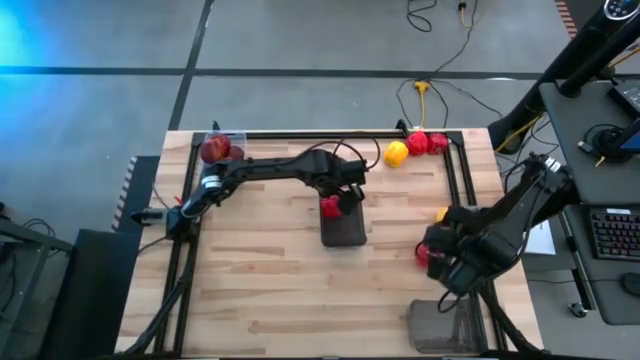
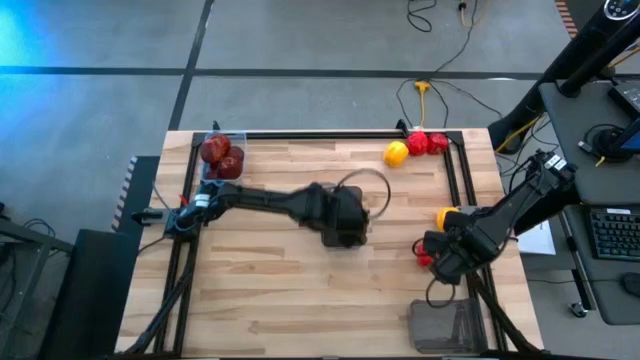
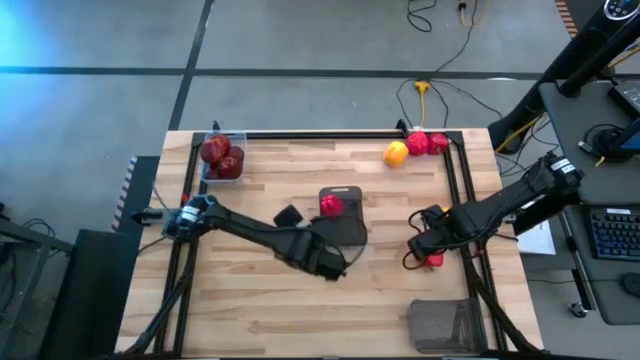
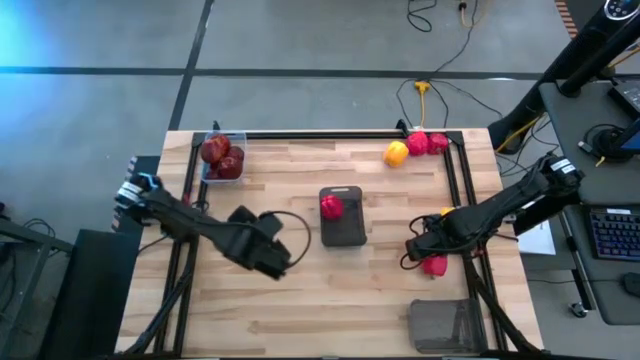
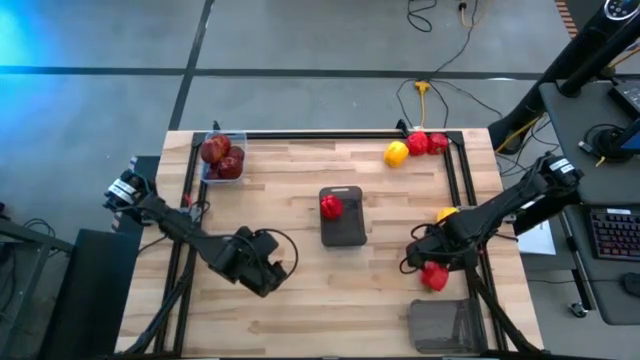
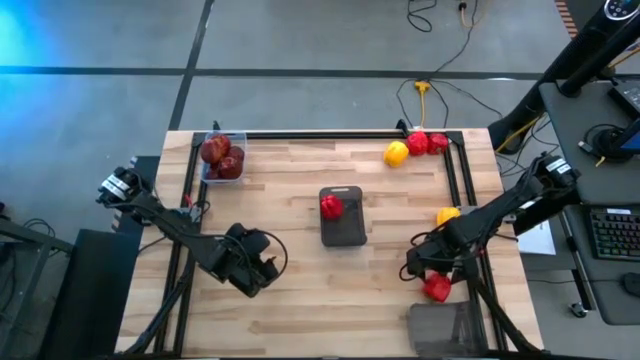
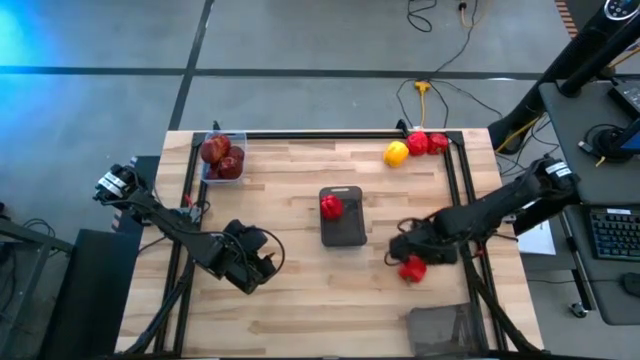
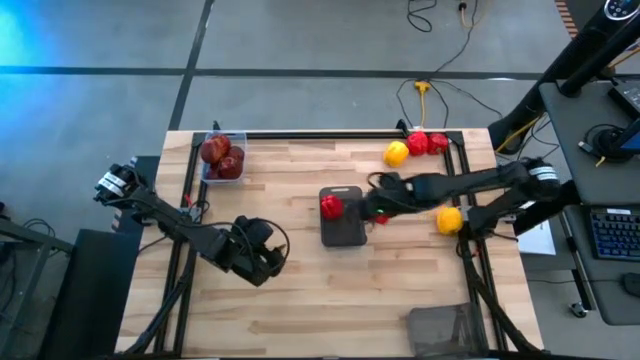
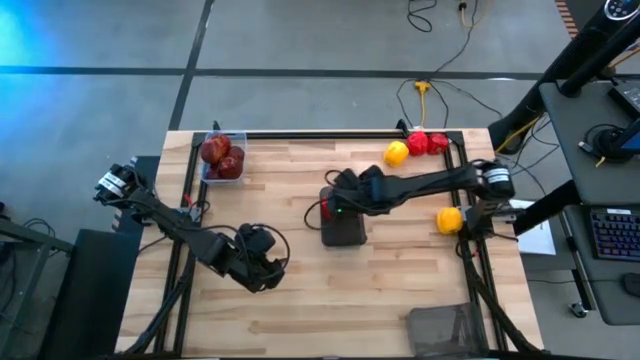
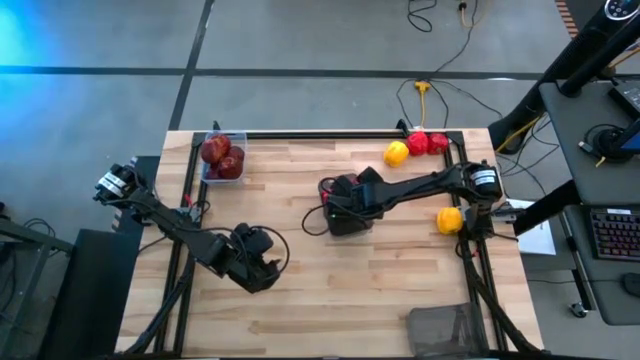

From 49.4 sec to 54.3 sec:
Task: Sort produce into baskets
Put the red bell pepper into the top black transparent bin

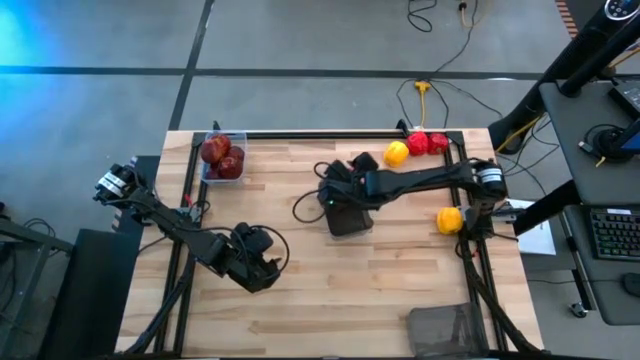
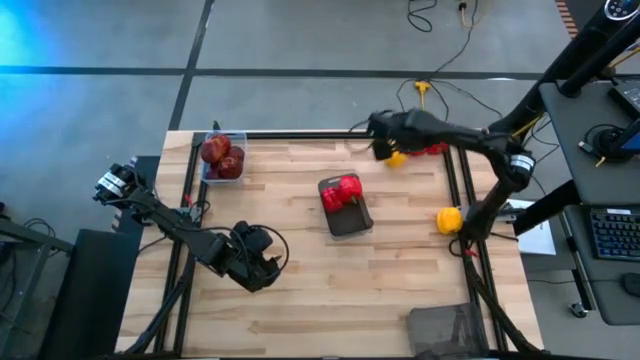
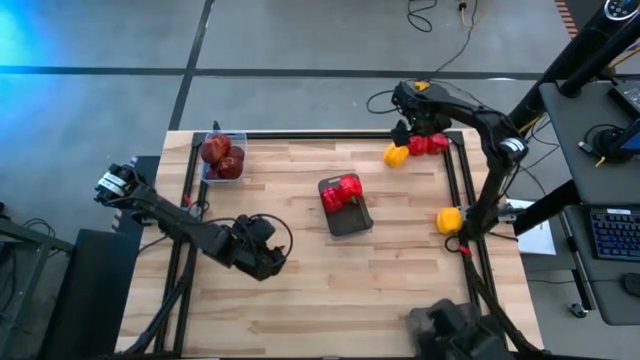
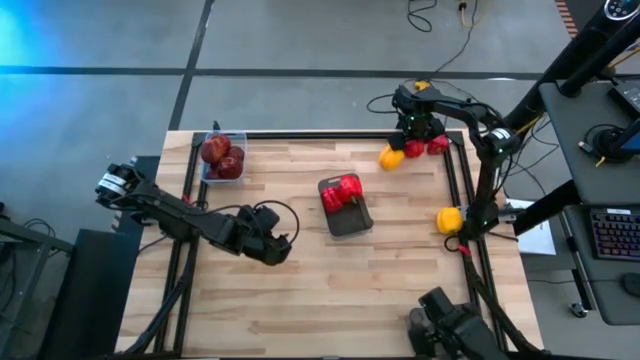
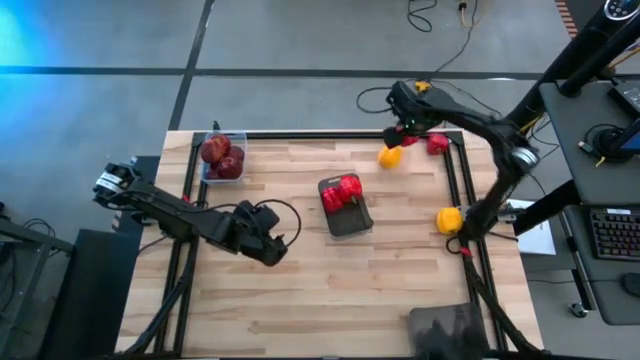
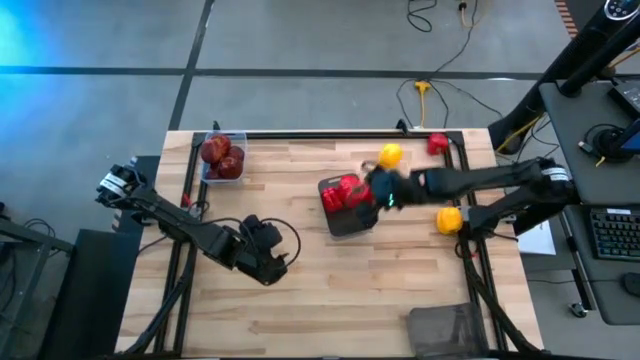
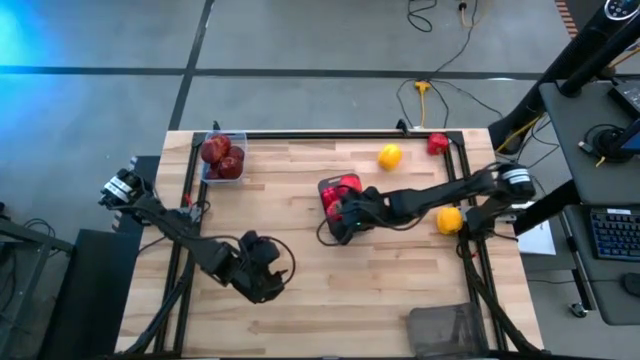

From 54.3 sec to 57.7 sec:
Put the red bell pepper into the top black transparent bin

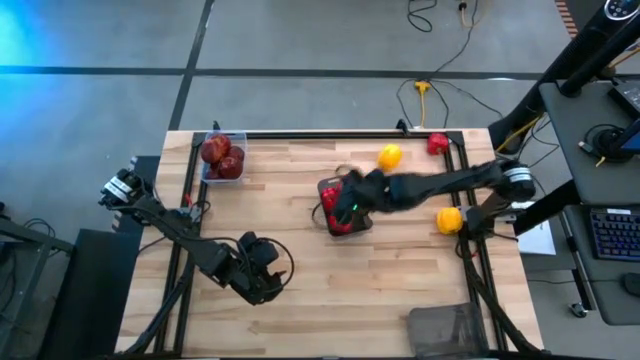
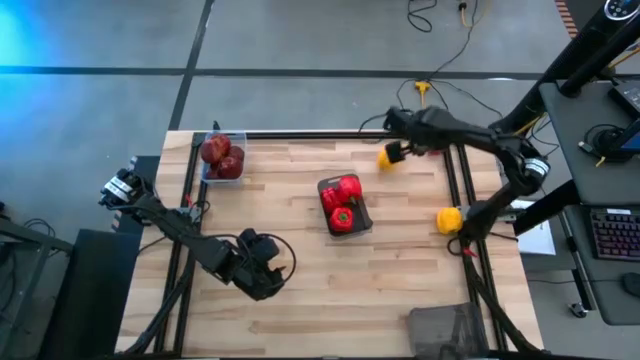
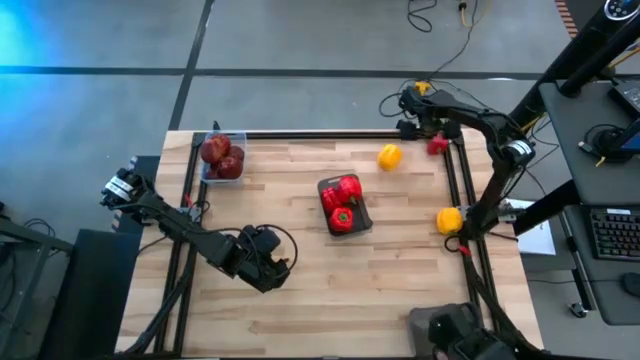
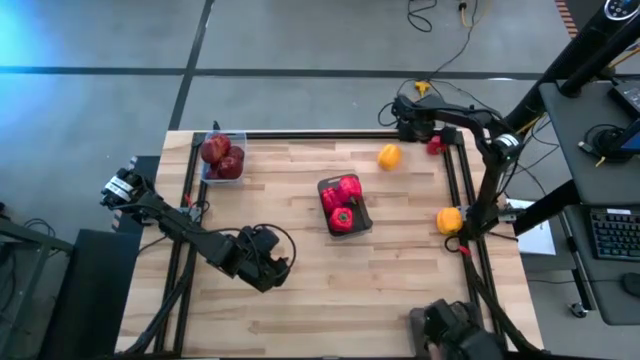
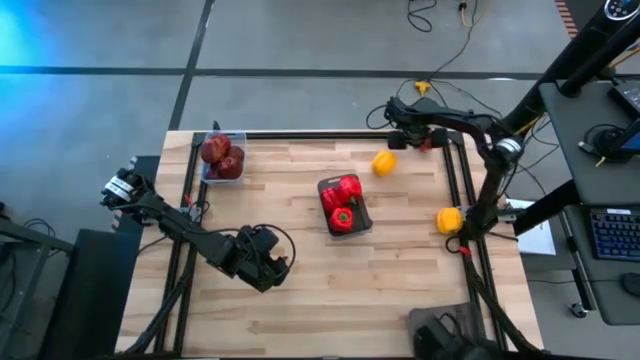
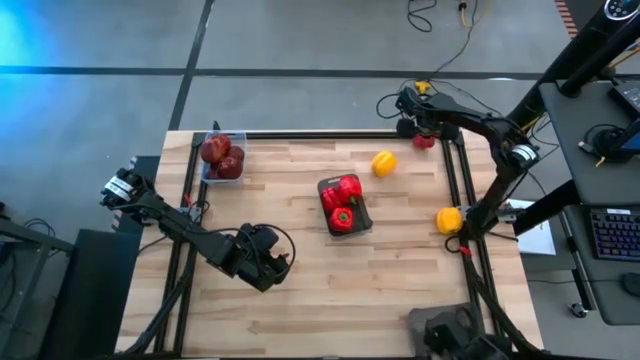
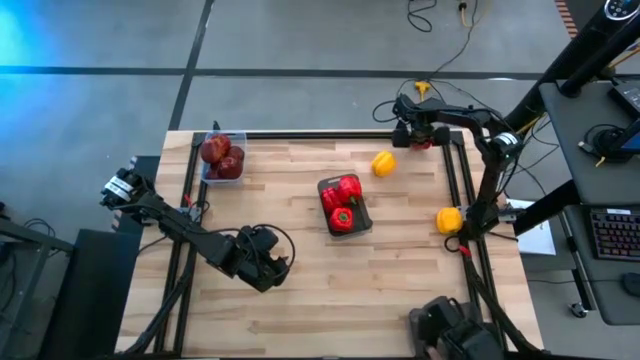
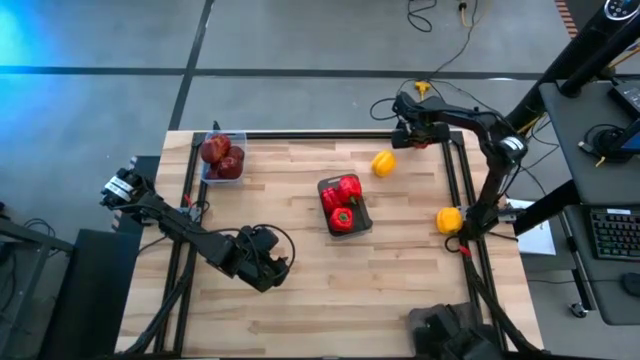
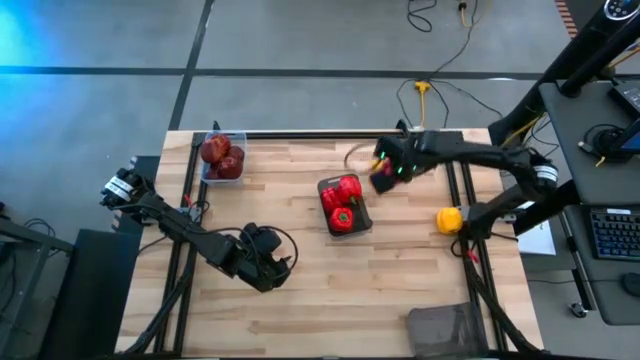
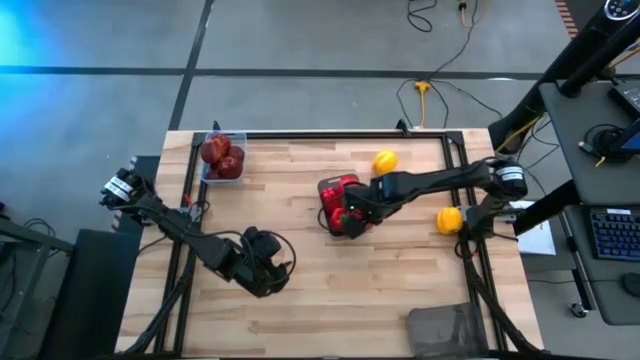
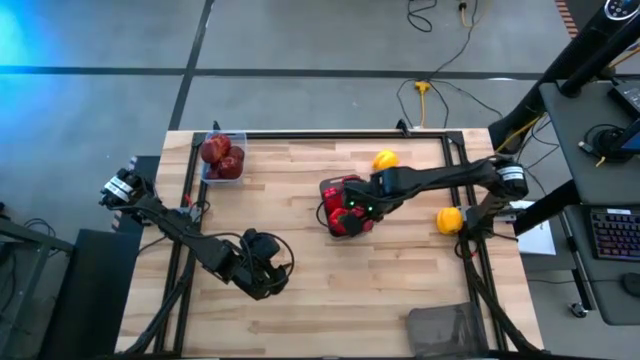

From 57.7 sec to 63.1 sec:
Put the red bell pepper into the top black transparent bin

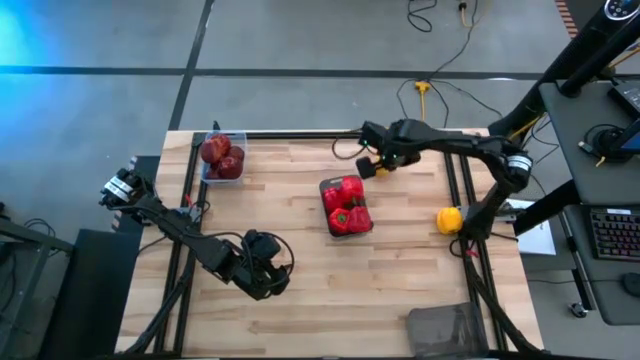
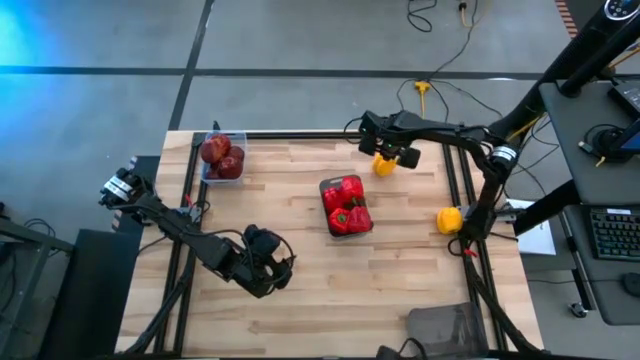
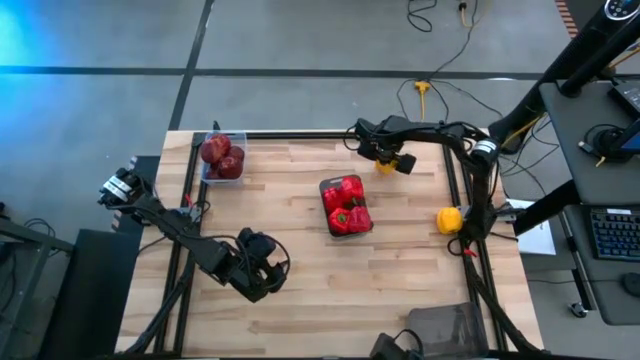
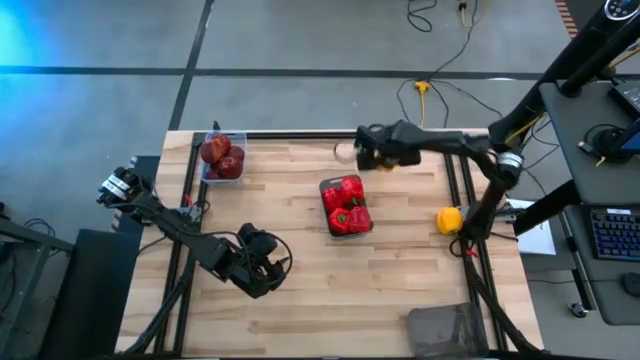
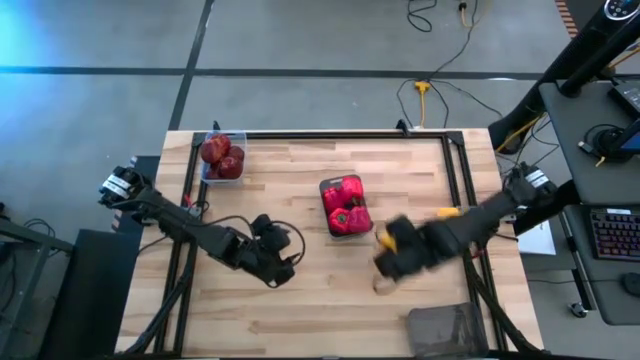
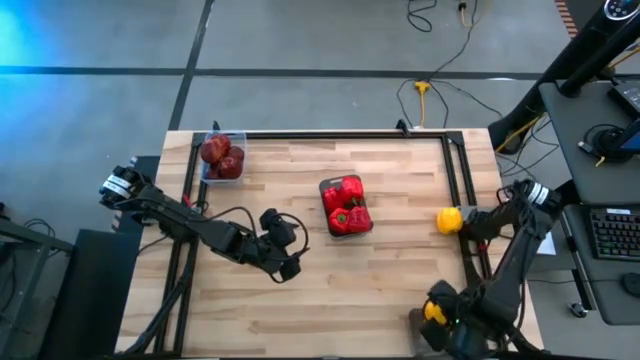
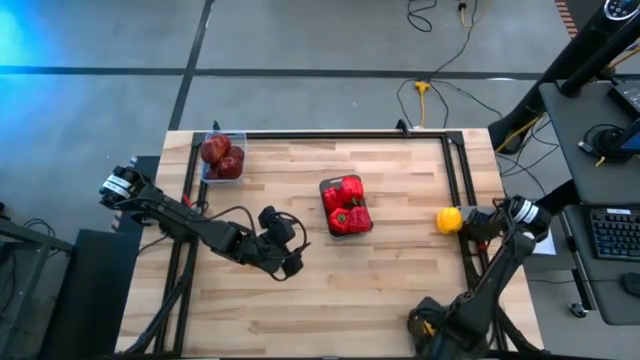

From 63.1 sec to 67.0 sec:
Put the yellow bell pepper into the bottom black transparent bin

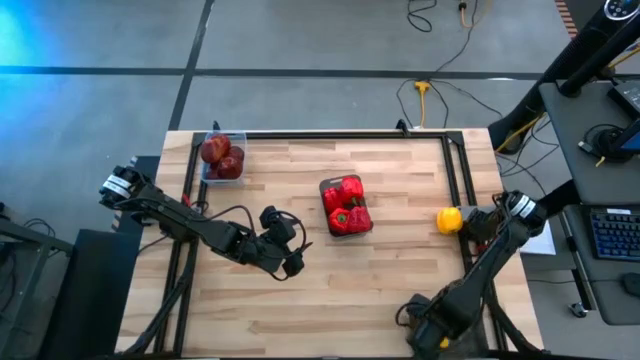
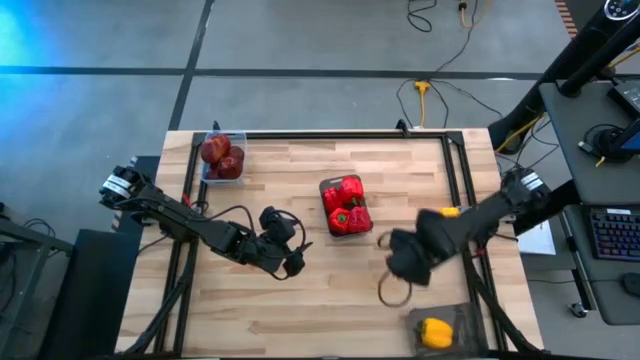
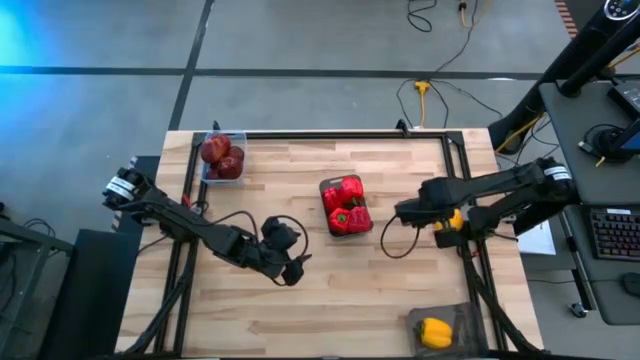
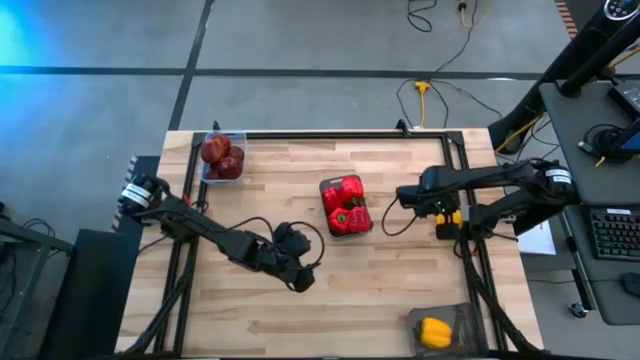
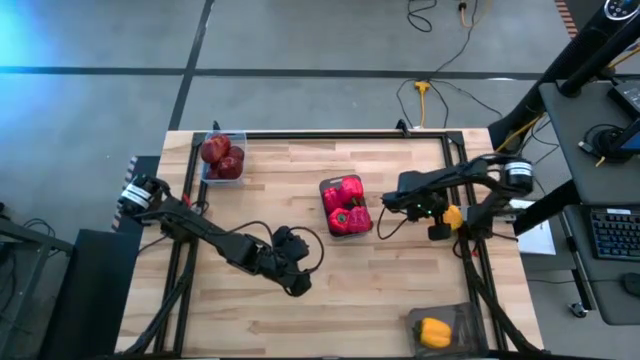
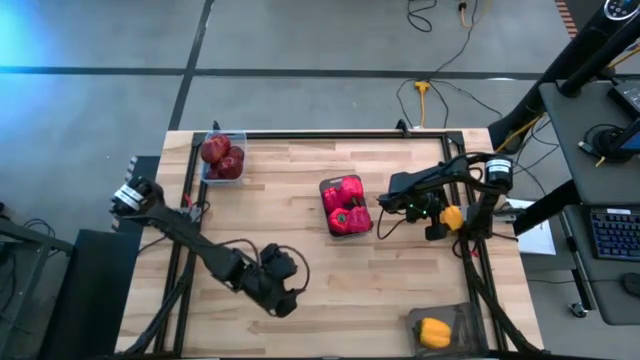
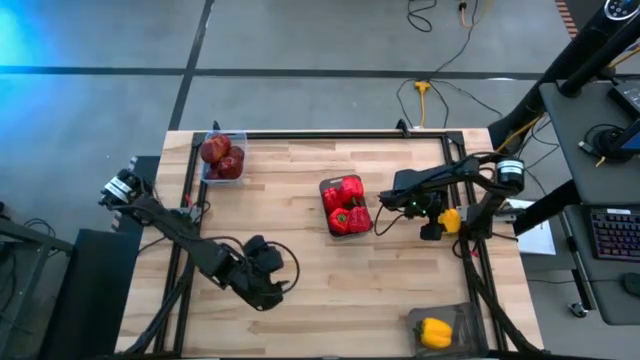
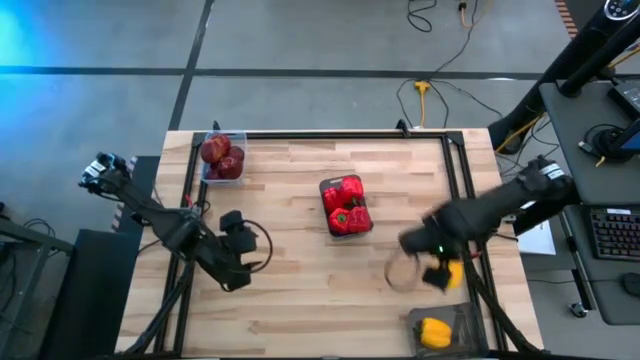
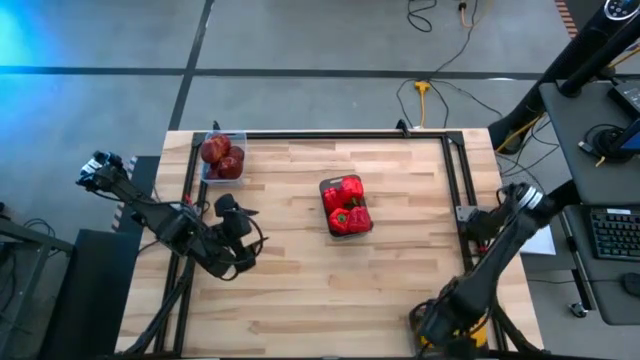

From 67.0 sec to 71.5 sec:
Put the yellow bell pepper into the bottom black transparent bin
